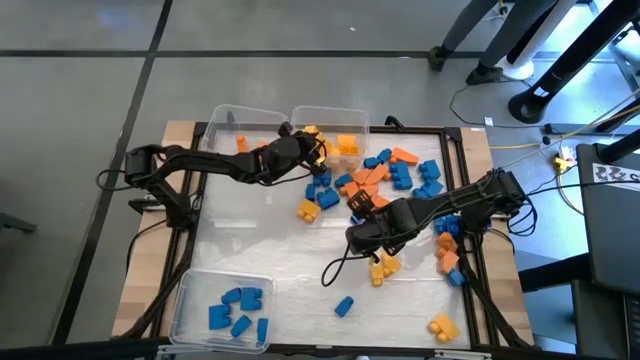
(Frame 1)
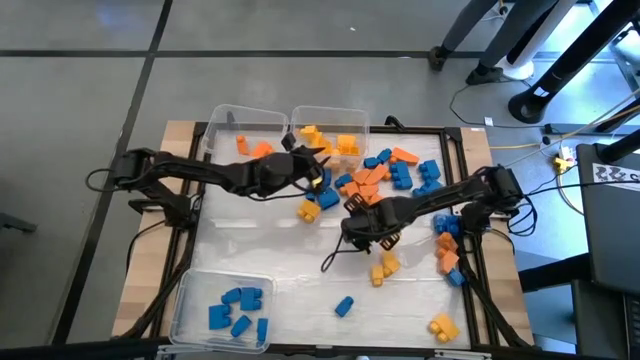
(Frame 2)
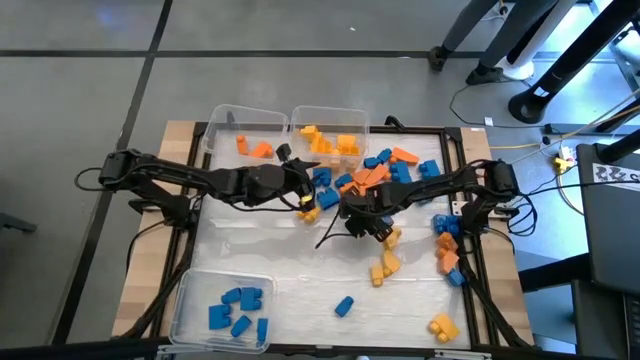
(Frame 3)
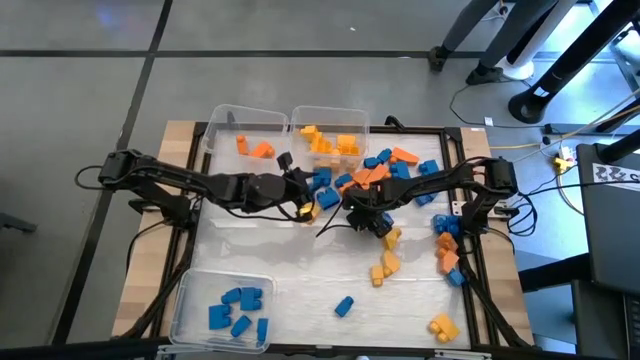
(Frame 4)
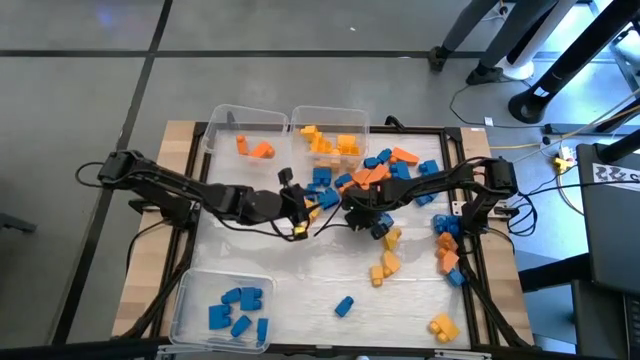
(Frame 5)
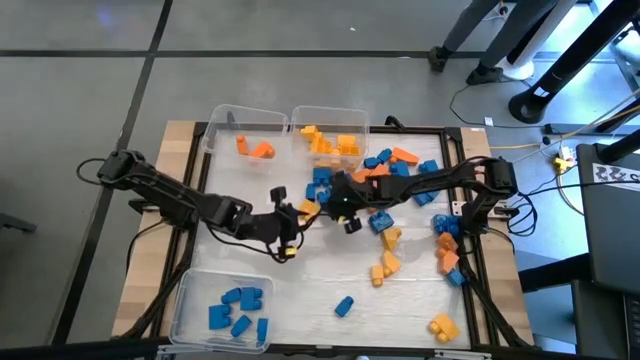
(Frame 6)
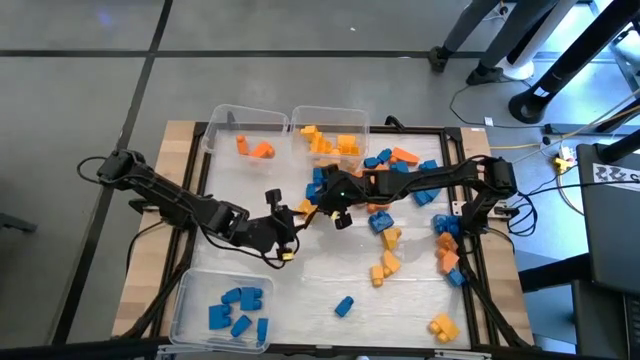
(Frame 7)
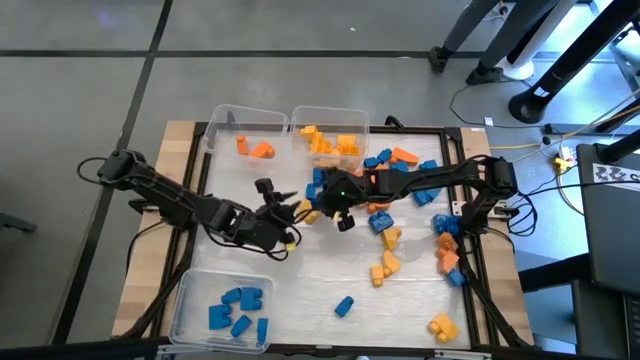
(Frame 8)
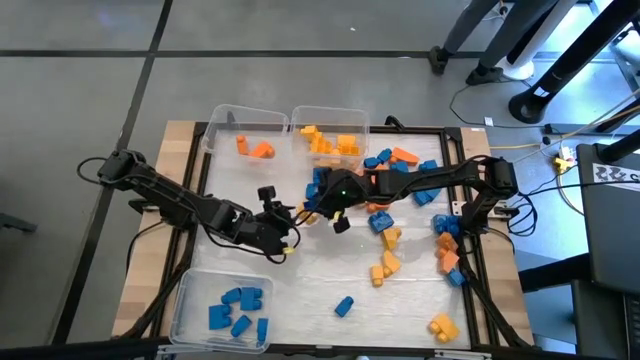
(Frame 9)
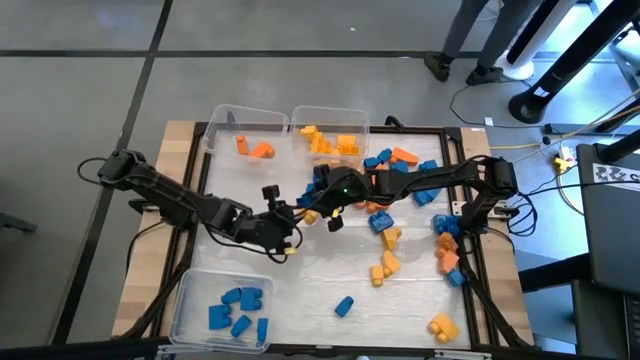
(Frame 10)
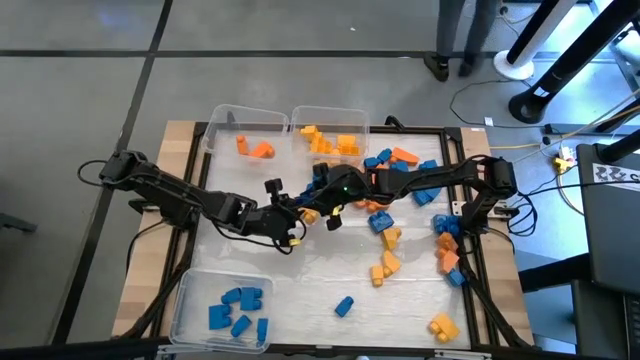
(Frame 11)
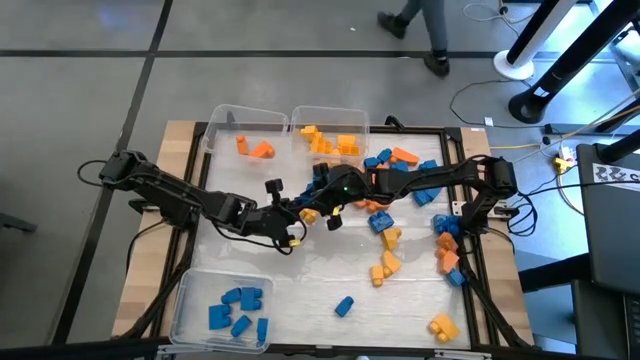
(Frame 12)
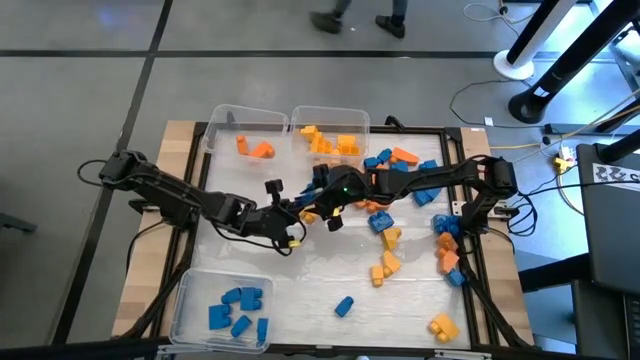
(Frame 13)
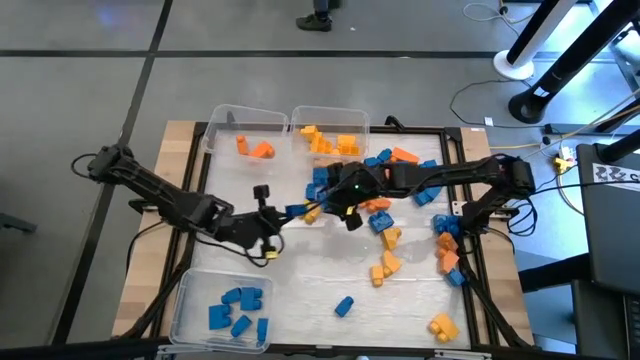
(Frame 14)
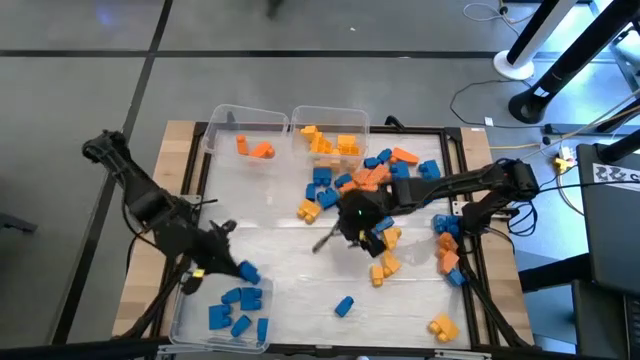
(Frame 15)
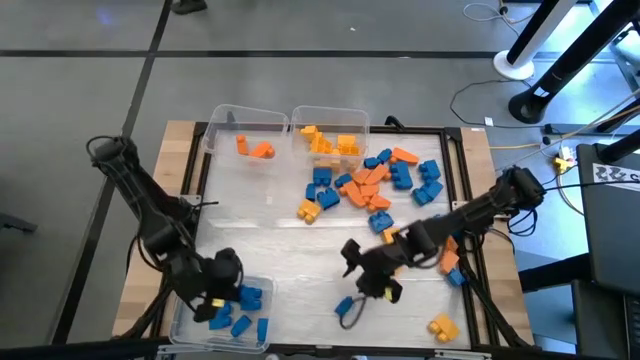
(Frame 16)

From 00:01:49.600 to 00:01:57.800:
Task: Sort blocks
Put the blue game piece into the bottom transparent bin

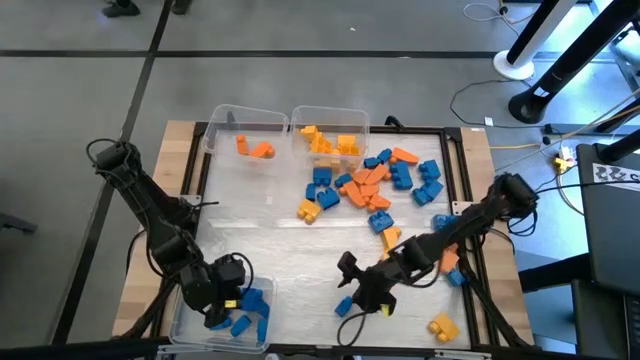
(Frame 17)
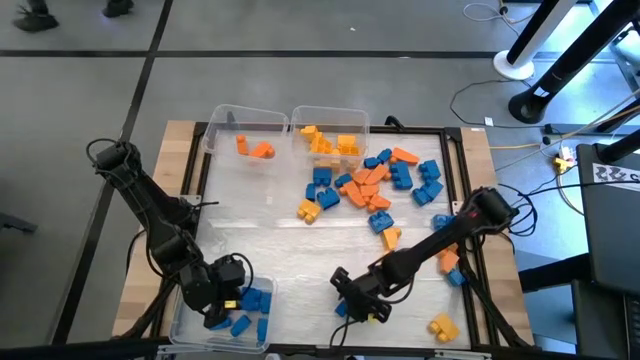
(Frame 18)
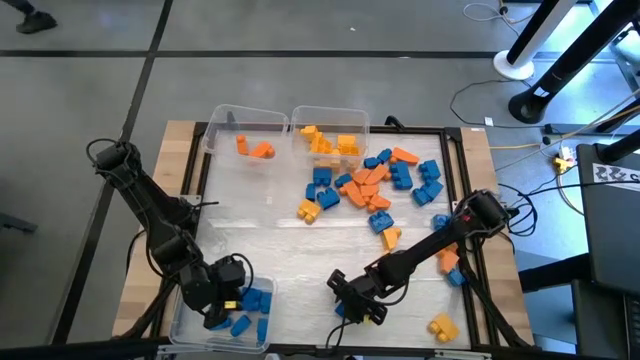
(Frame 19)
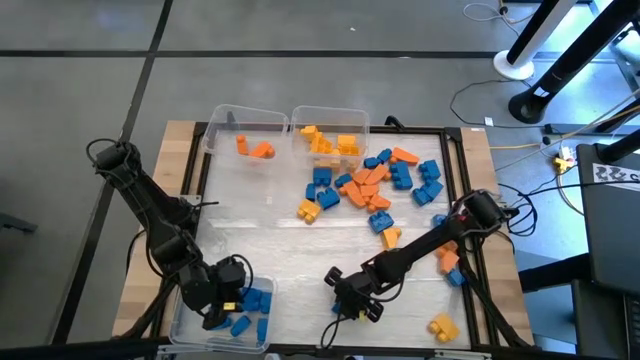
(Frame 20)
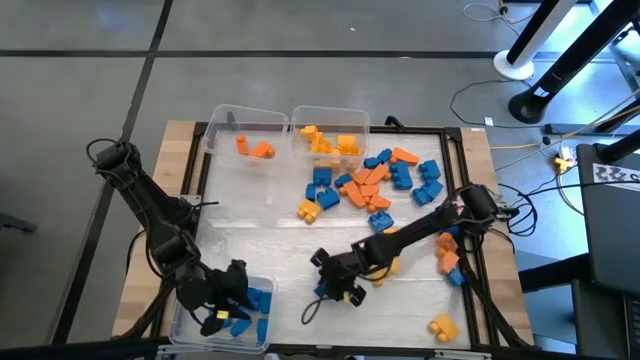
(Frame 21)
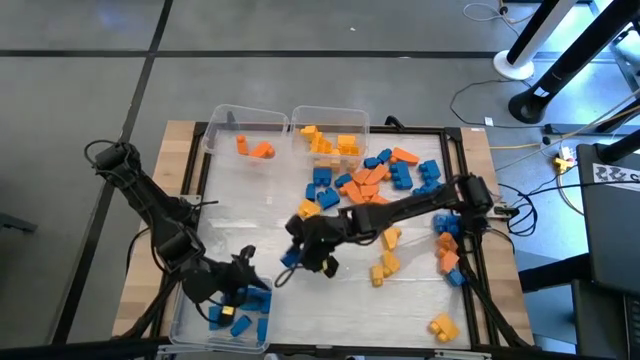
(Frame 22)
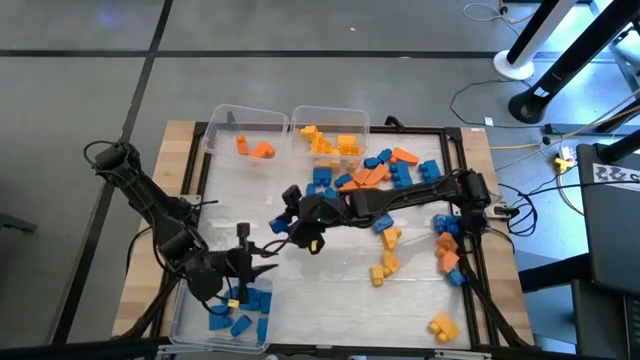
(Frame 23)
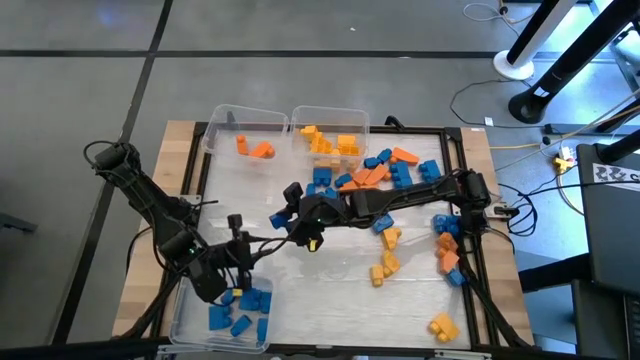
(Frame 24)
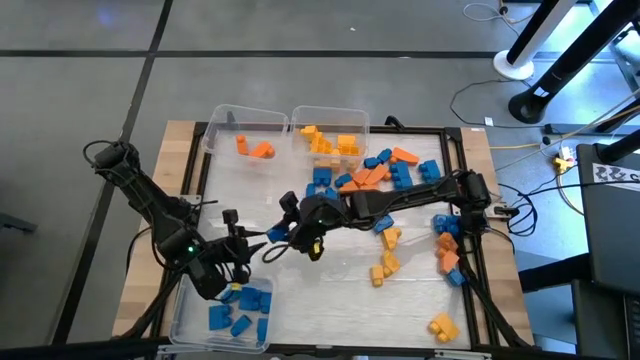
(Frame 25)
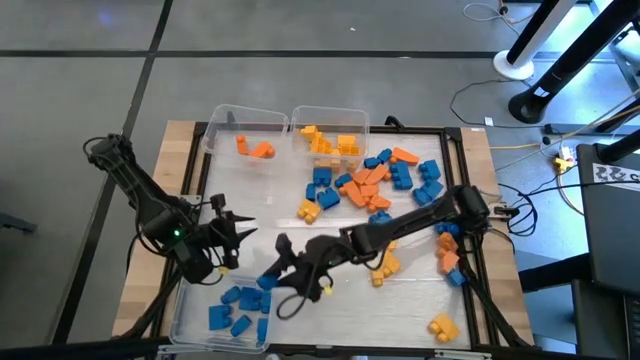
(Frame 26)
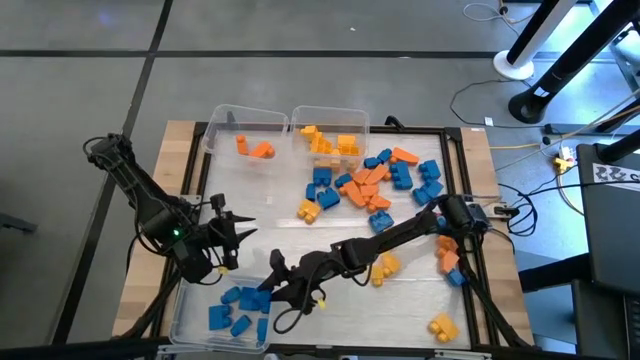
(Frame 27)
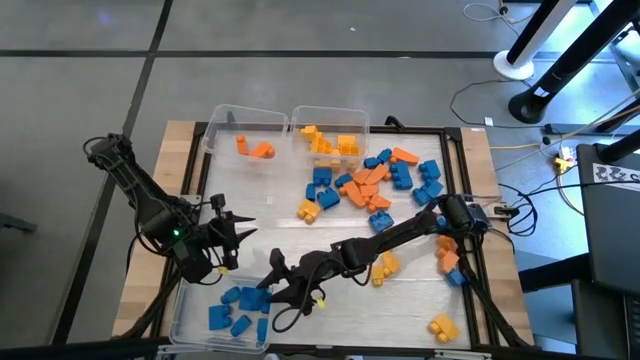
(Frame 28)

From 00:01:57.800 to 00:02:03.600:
Put the blue game piece into the bottom transparent bin

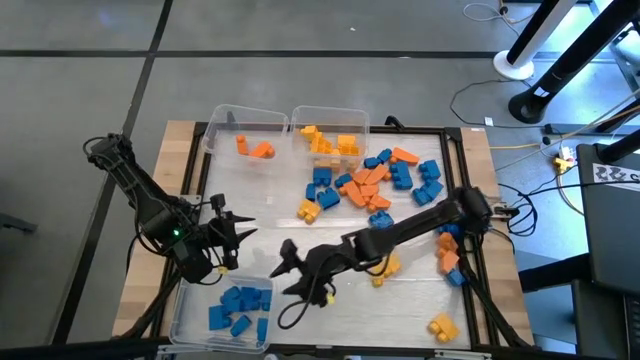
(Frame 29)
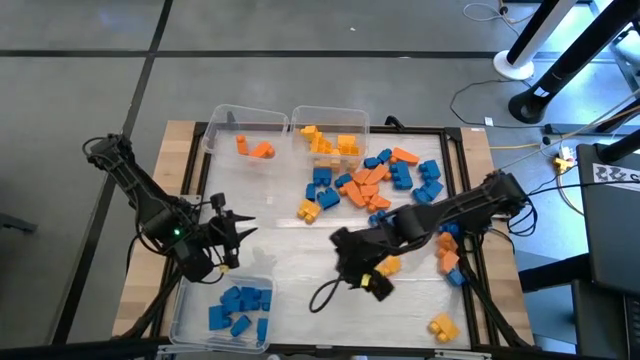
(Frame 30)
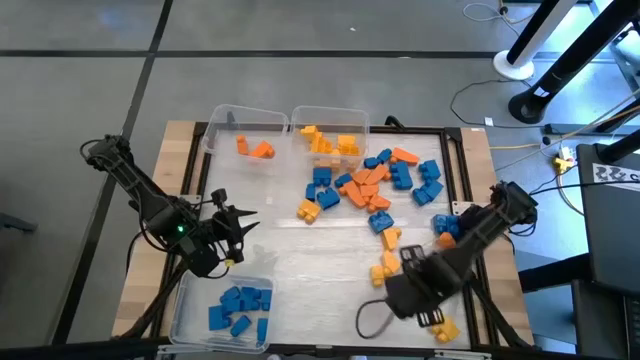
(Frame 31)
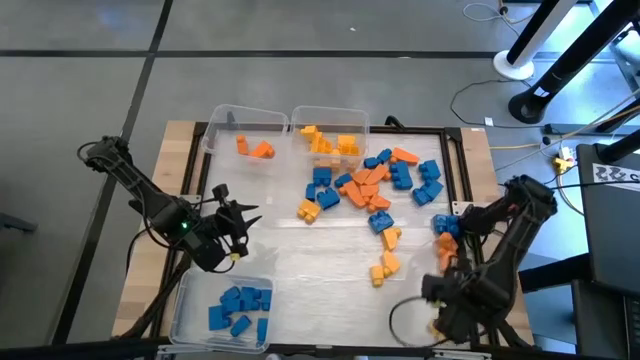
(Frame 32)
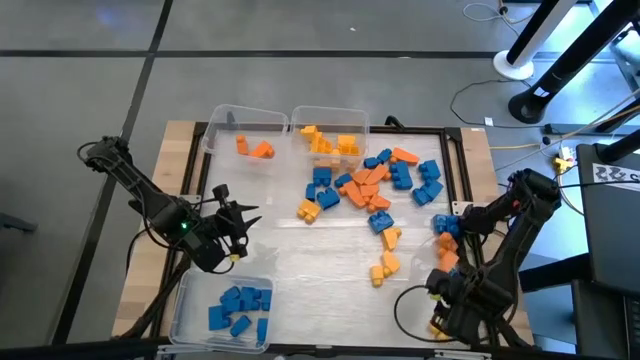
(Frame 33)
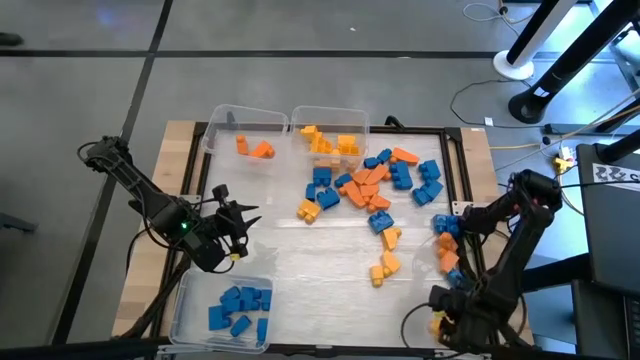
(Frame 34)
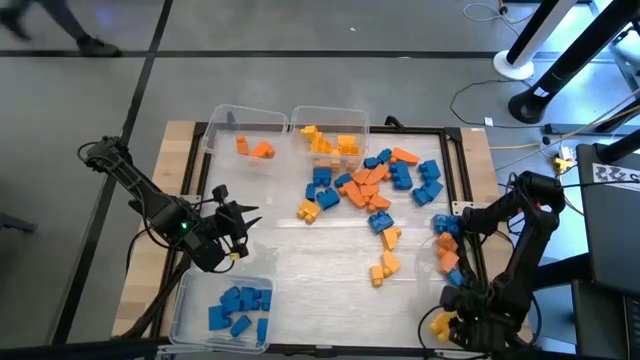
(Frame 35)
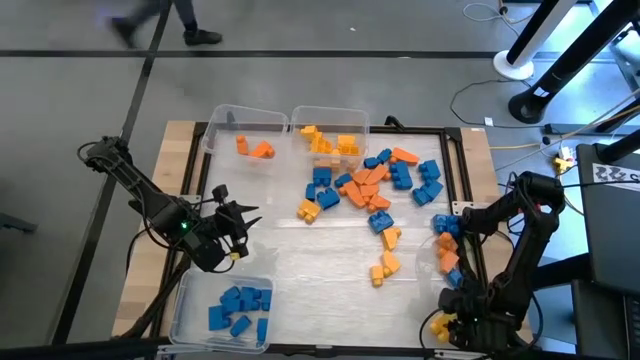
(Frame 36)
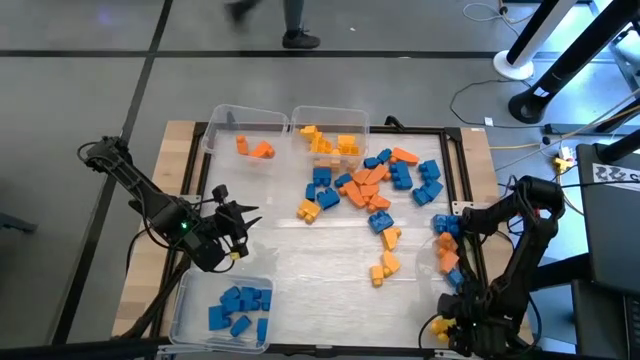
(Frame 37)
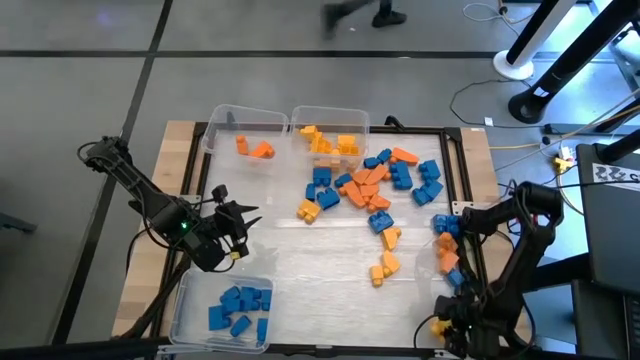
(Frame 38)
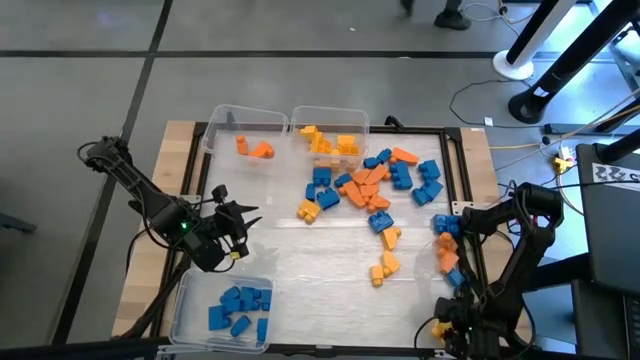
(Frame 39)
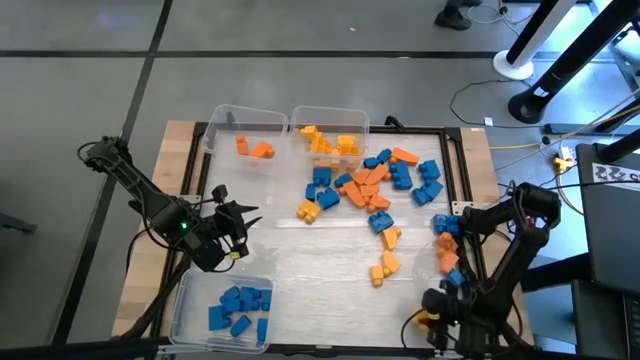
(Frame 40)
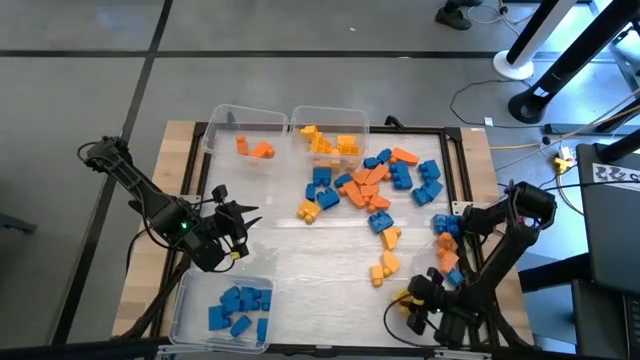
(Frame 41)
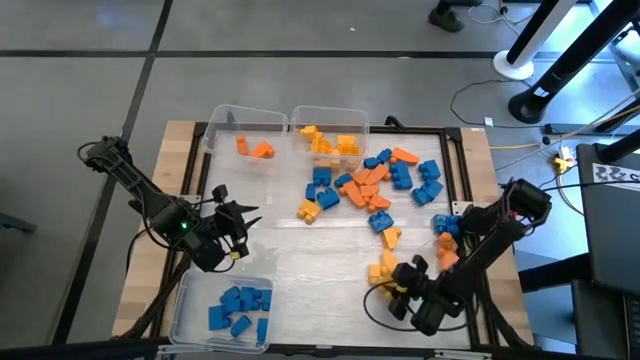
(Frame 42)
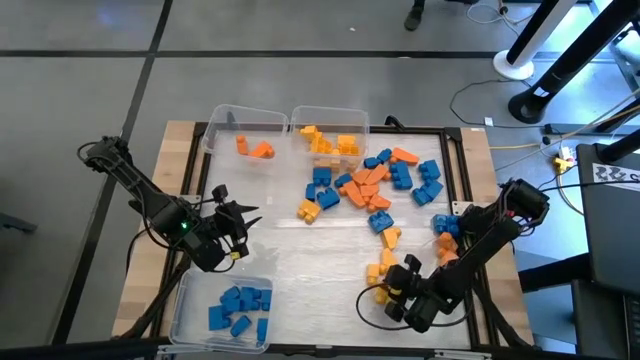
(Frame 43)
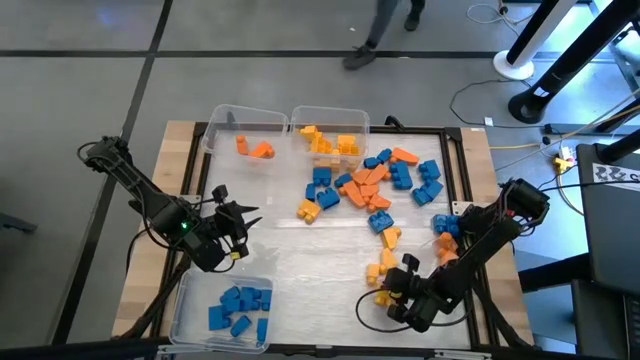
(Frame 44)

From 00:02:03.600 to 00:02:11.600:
Put the yellow game piece into the top right transparent bin
